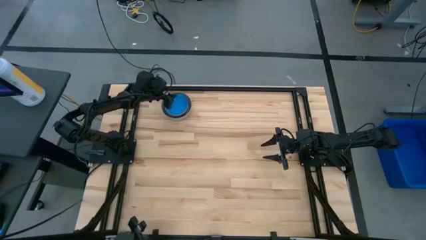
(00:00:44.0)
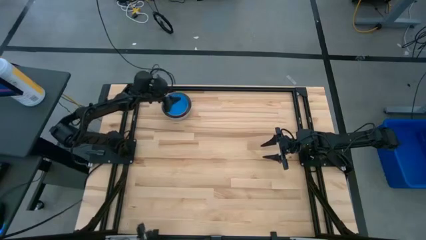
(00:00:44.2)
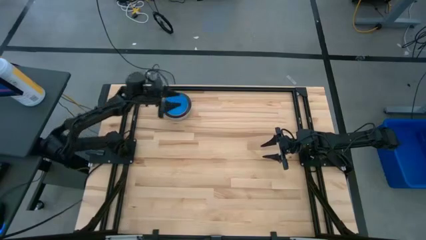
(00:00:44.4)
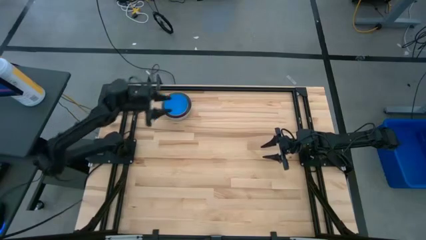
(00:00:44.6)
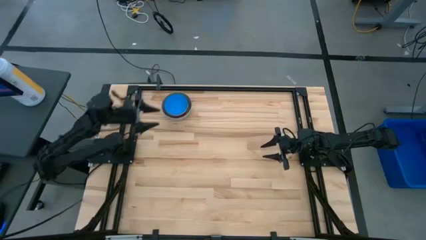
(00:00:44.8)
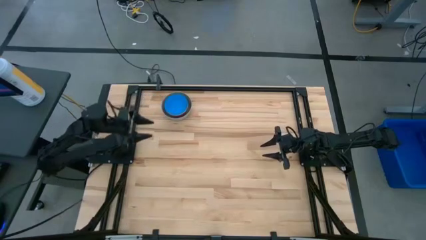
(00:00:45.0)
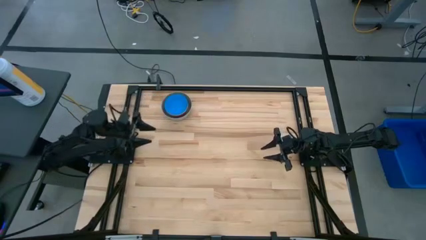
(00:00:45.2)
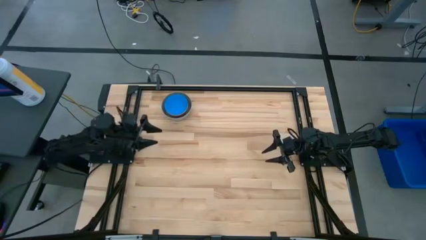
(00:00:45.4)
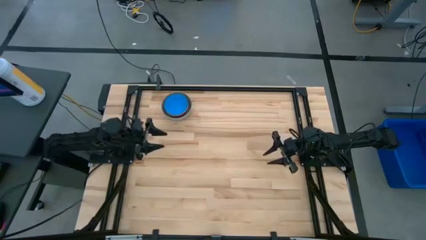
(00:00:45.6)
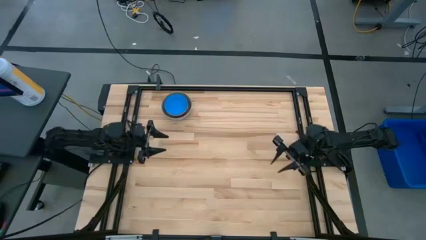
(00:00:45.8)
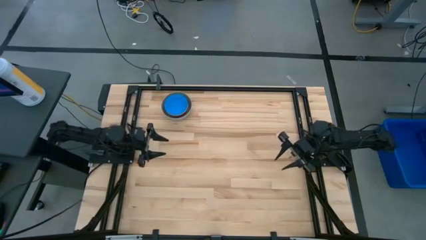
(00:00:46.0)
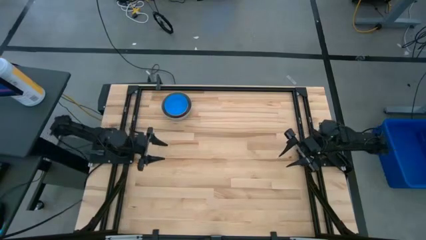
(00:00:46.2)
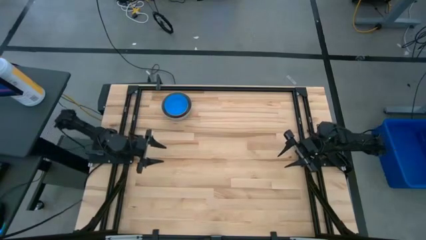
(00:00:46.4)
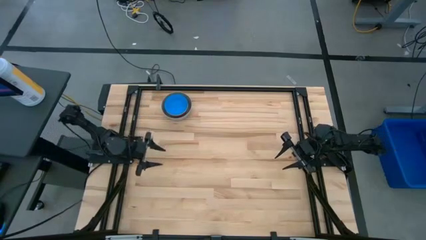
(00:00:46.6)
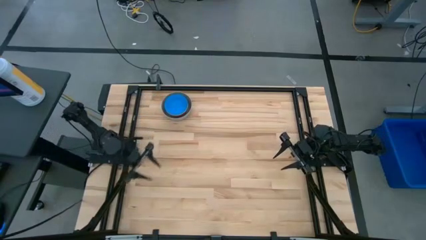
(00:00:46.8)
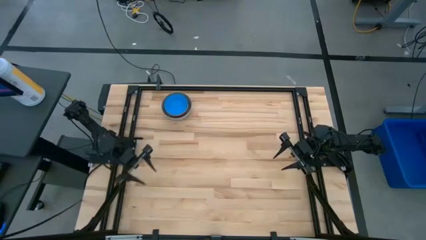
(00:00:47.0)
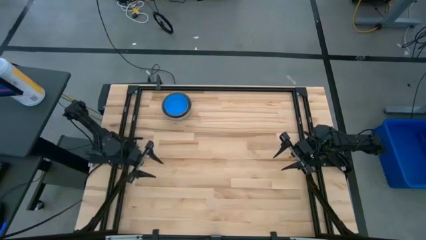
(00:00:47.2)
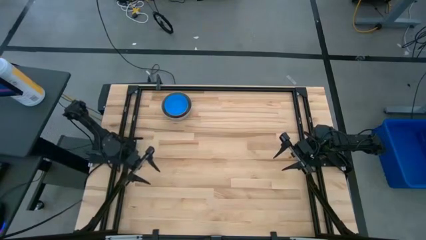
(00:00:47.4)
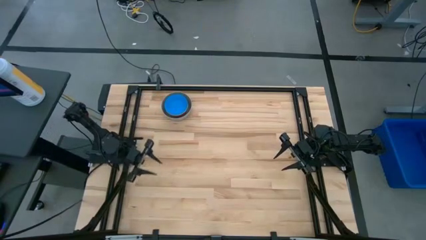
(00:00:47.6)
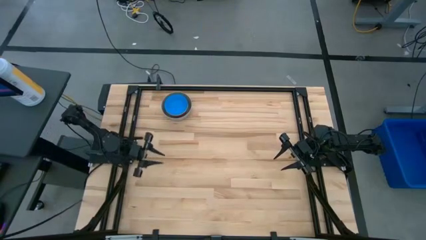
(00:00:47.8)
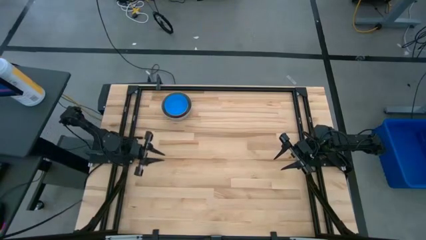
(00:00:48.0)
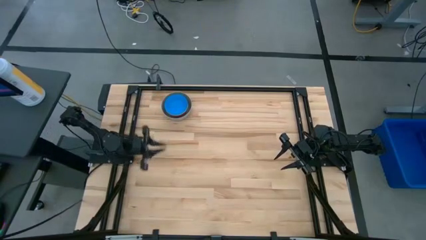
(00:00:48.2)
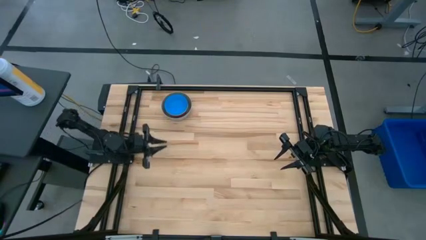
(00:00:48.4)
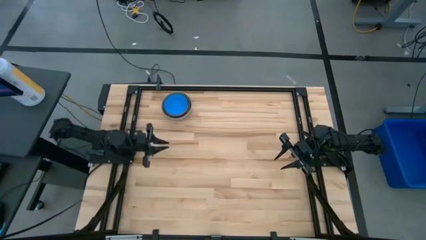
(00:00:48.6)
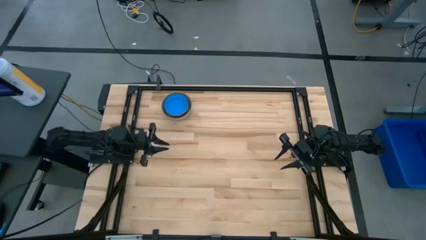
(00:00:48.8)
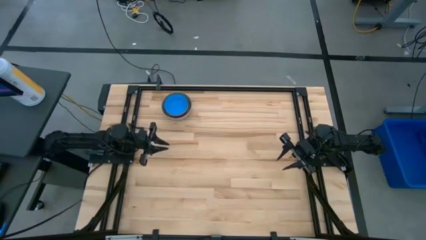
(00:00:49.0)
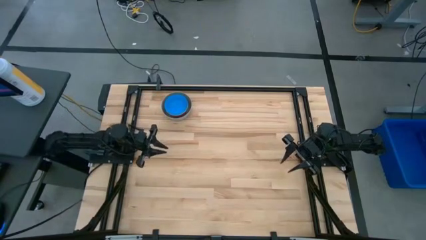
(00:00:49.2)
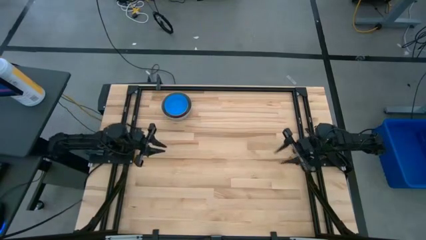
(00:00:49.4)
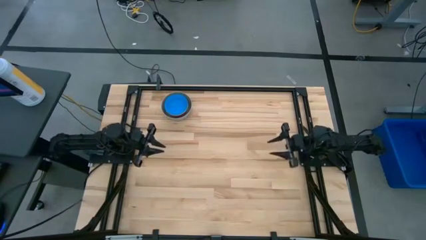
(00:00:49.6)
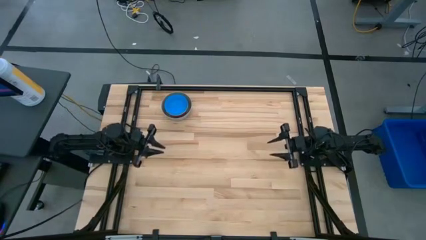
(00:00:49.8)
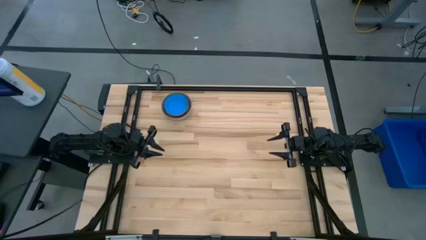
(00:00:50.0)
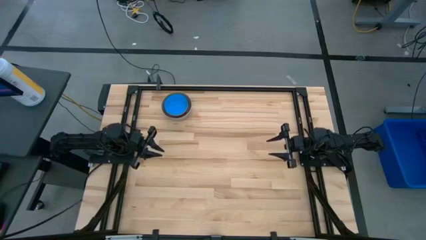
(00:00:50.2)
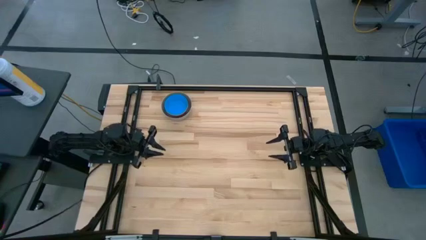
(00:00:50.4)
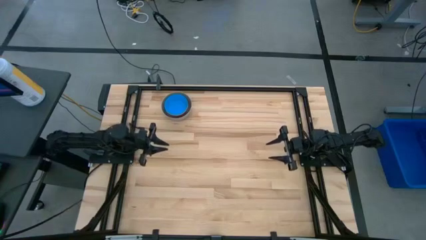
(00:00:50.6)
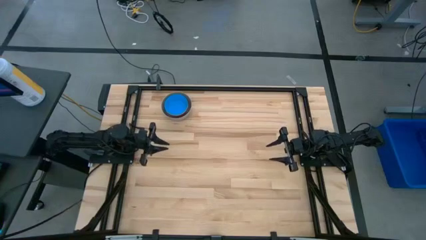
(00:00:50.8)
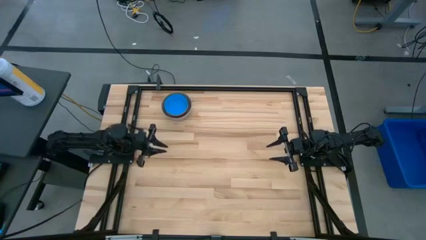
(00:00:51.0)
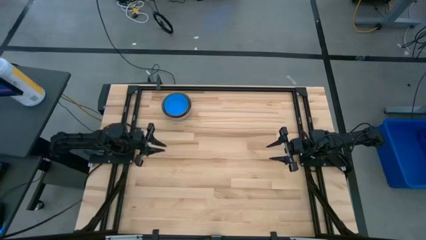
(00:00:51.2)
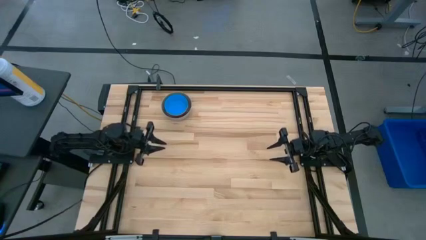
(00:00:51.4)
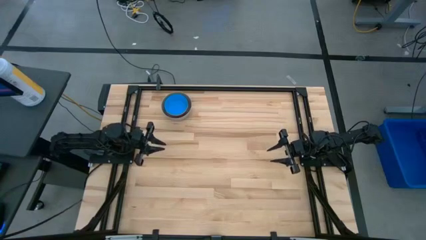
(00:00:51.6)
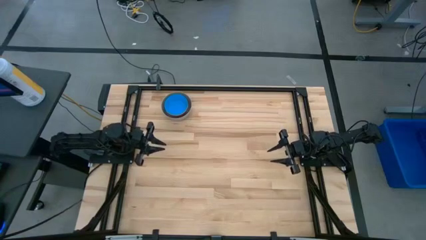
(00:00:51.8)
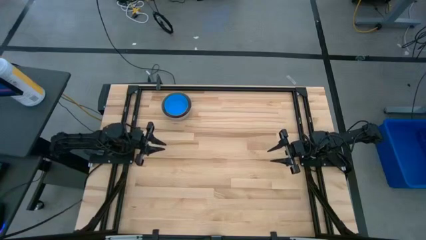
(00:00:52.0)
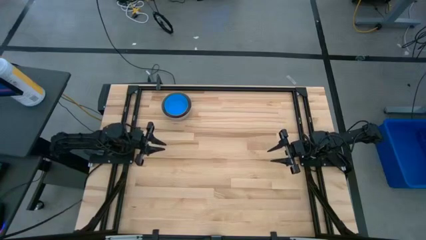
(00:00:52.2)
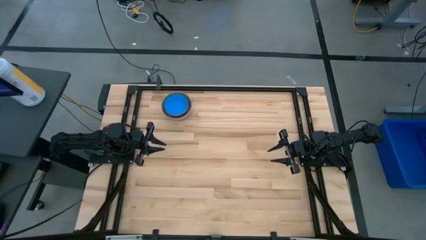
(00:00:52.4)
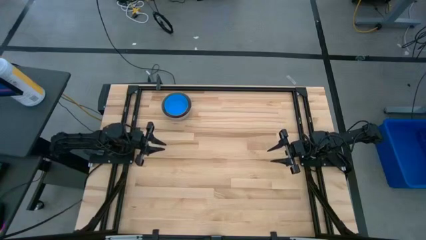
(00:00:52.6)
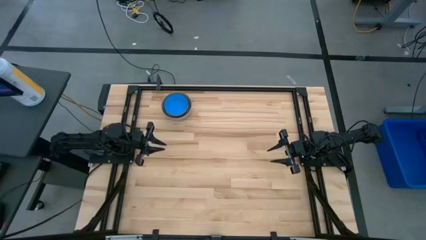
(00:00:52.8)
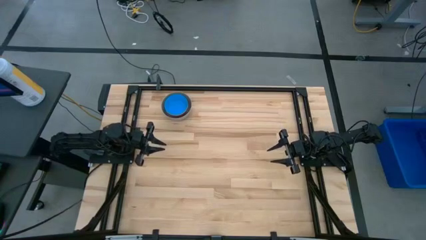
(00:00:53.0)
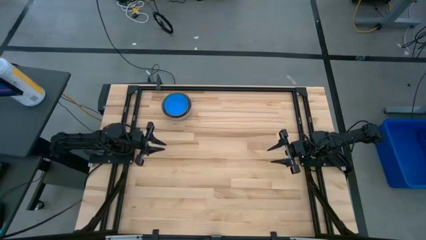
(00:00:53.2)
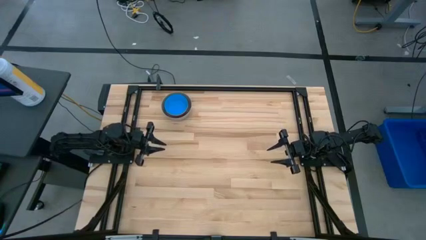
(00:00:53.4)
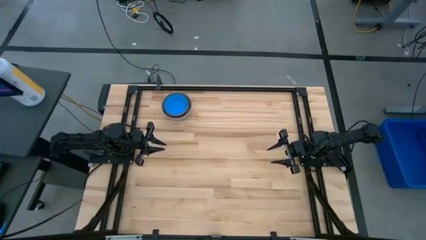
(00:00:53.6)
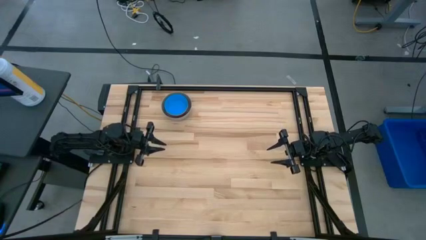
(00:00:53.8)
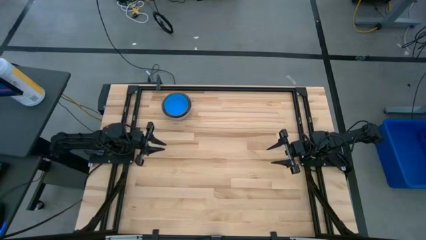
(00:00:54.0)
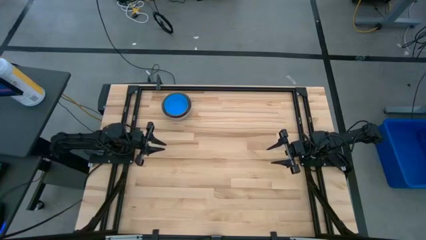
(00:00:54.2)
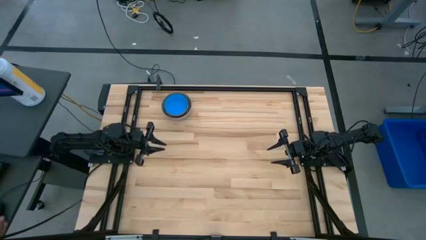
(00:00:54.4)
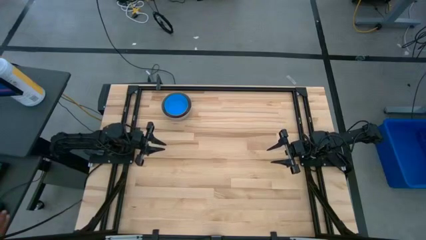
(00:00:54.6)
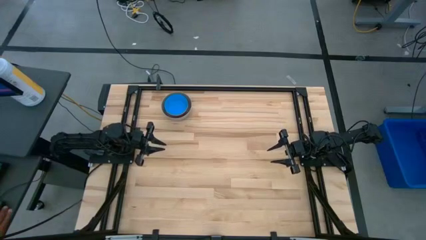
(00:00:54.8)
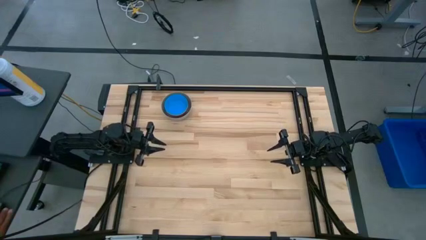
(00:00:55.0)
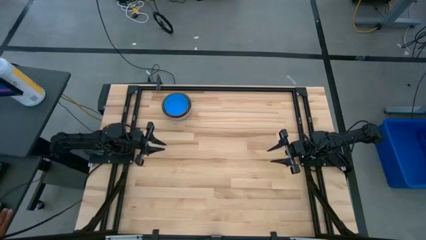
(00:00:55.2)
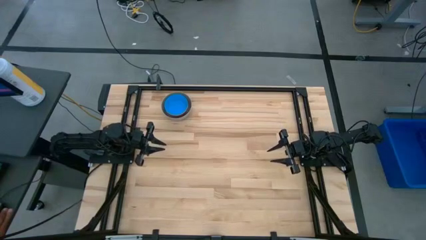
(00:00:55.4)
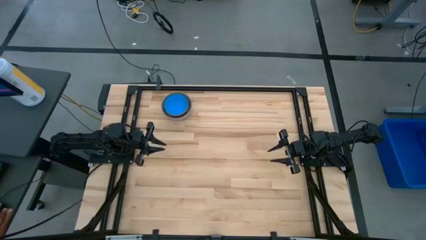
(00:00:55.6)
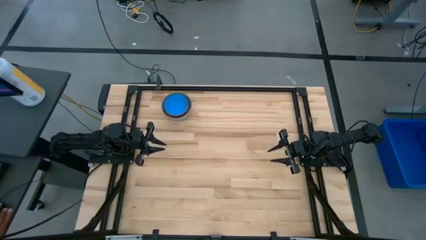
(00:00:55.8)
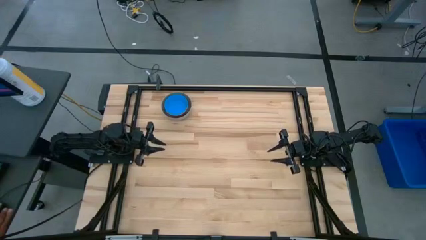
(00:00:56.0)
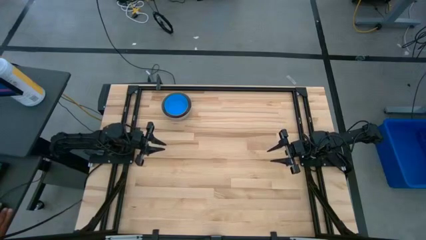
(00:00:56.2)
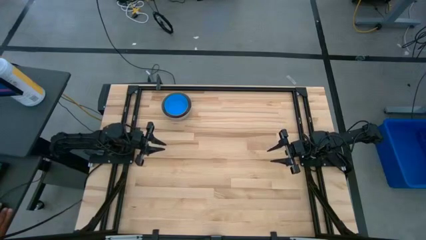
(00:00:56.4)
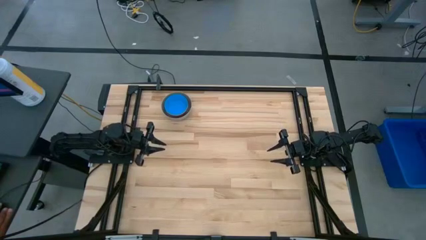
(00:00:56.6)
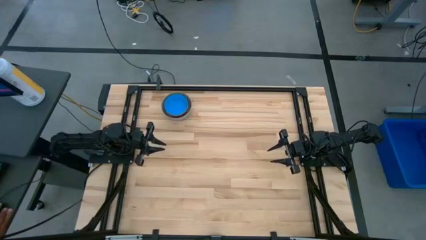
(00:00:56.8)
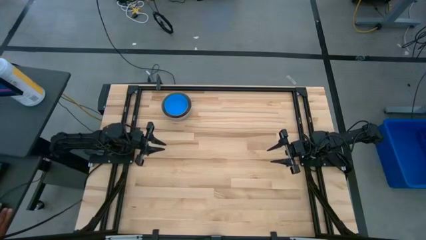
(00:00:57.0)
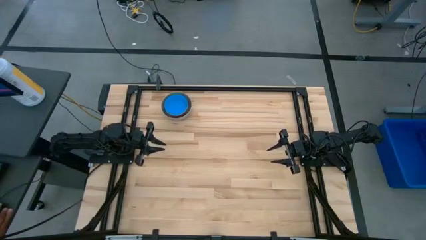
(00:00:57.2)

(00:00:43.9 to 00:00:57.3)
Return to Home Position
